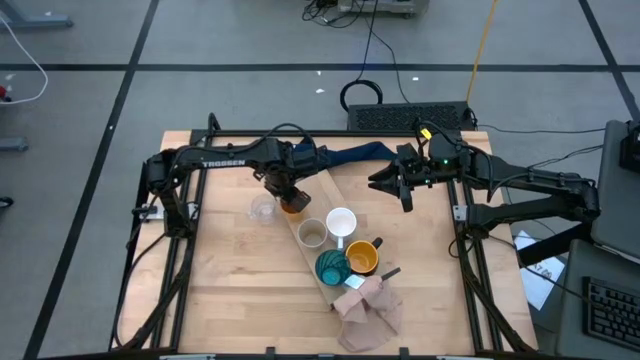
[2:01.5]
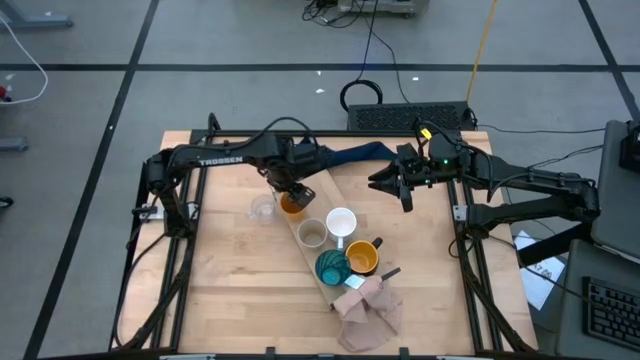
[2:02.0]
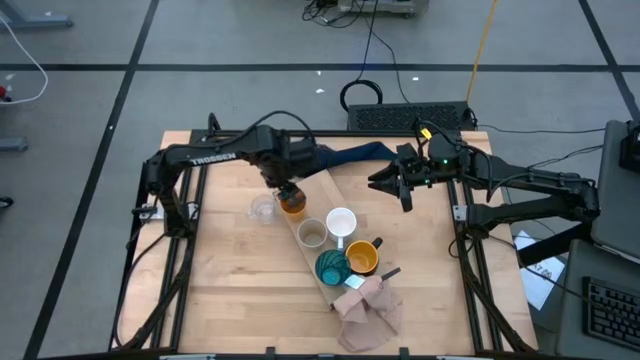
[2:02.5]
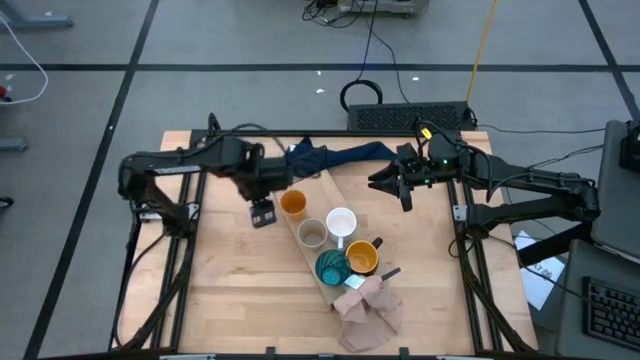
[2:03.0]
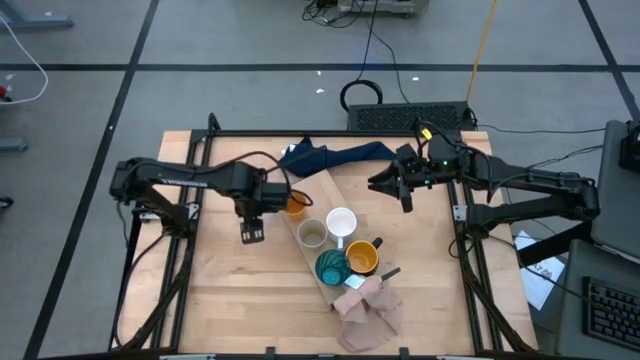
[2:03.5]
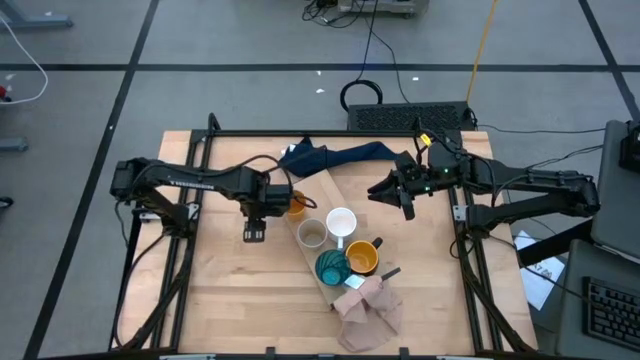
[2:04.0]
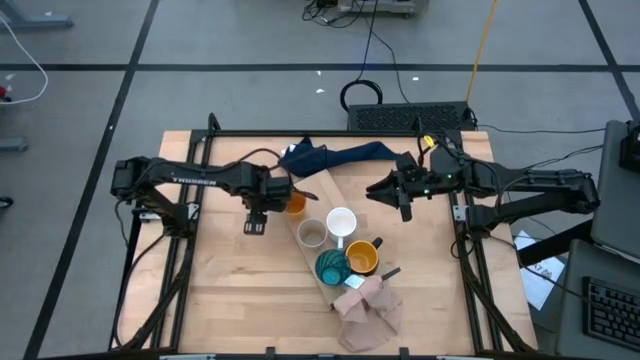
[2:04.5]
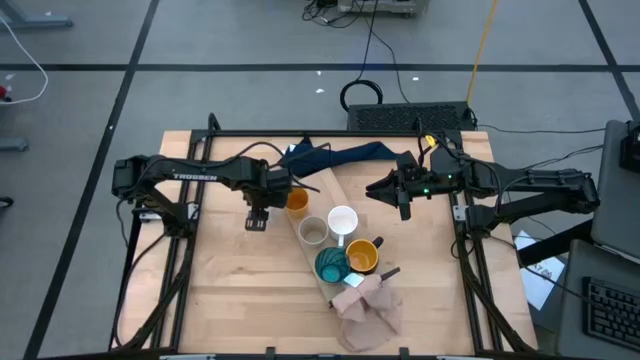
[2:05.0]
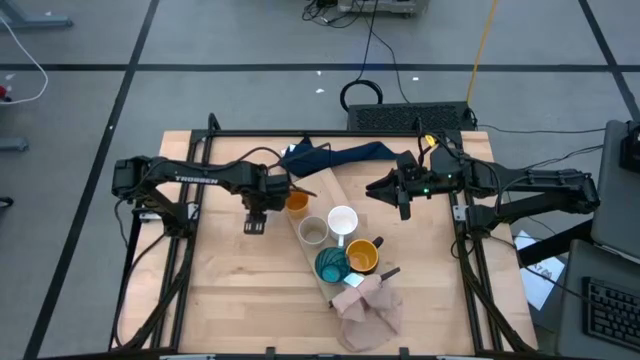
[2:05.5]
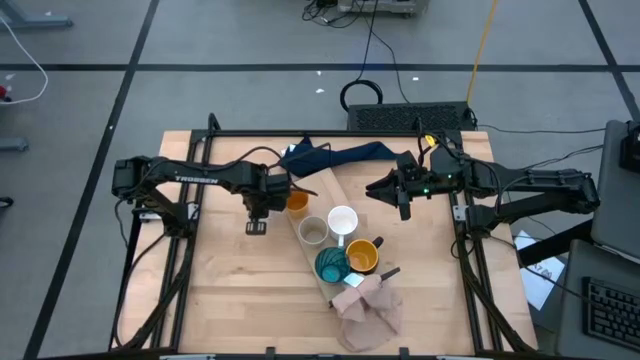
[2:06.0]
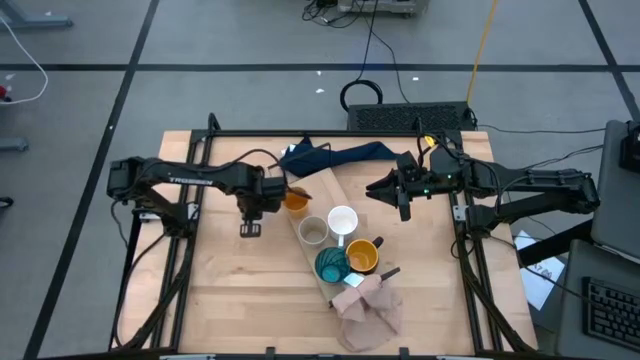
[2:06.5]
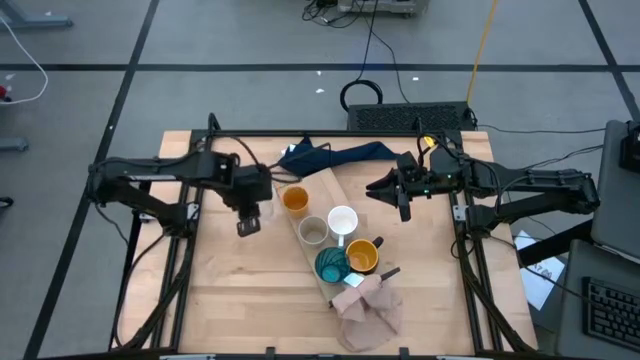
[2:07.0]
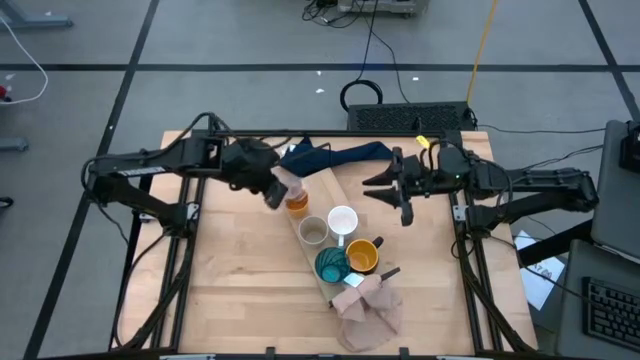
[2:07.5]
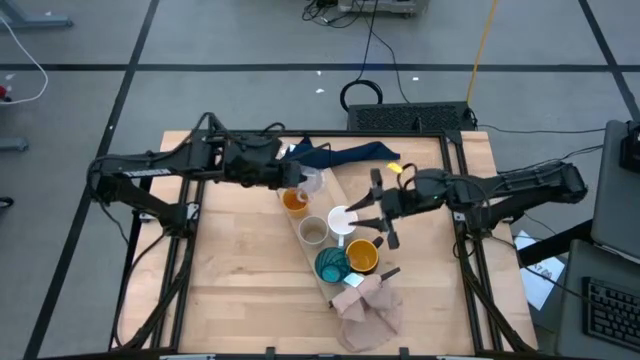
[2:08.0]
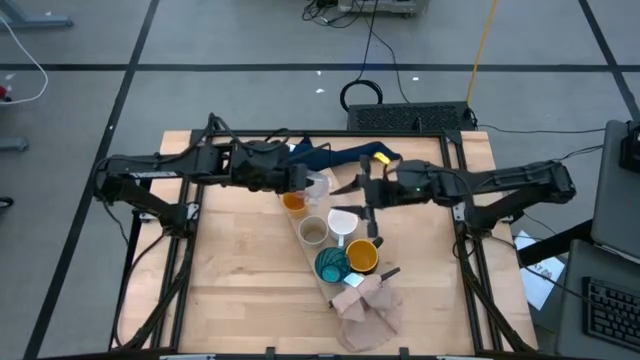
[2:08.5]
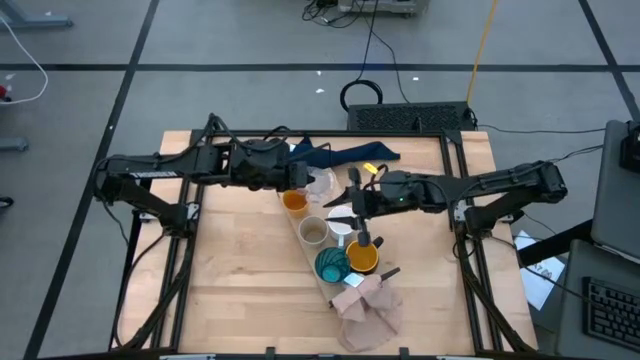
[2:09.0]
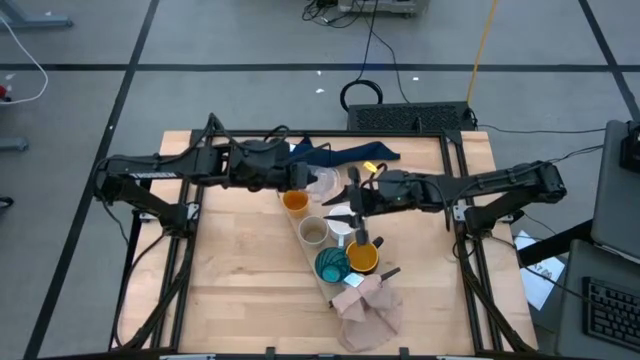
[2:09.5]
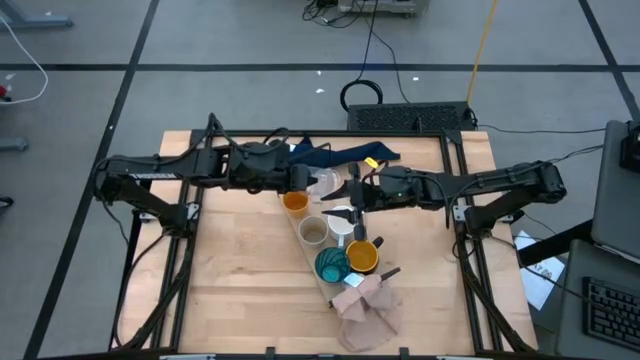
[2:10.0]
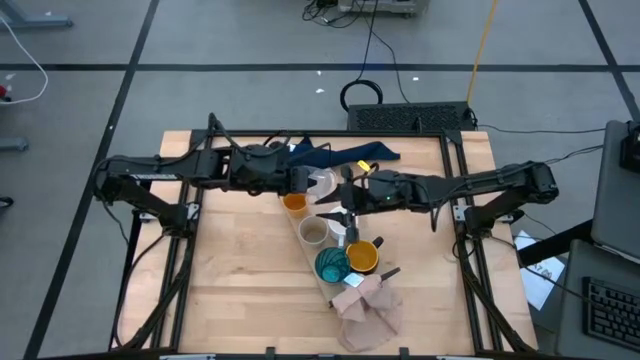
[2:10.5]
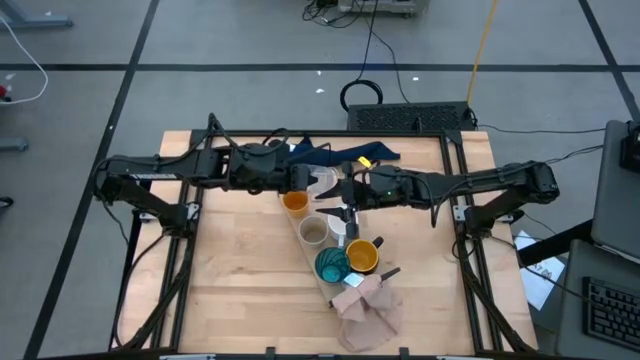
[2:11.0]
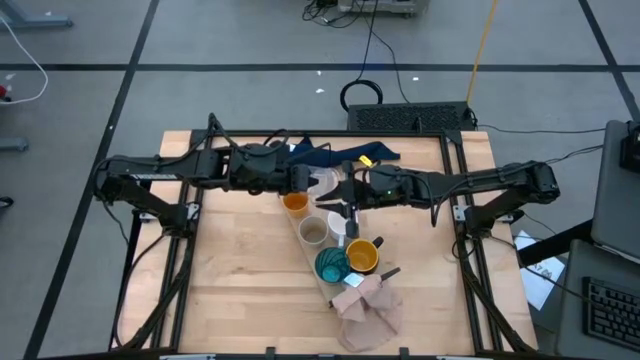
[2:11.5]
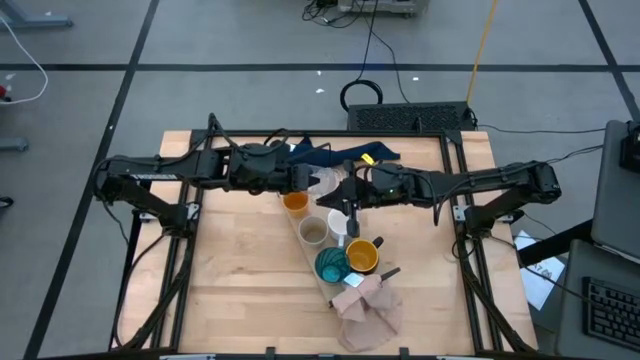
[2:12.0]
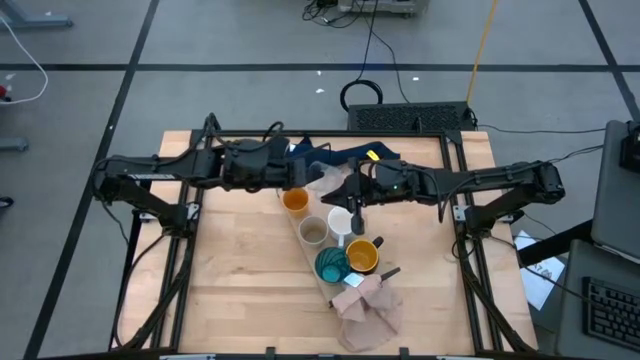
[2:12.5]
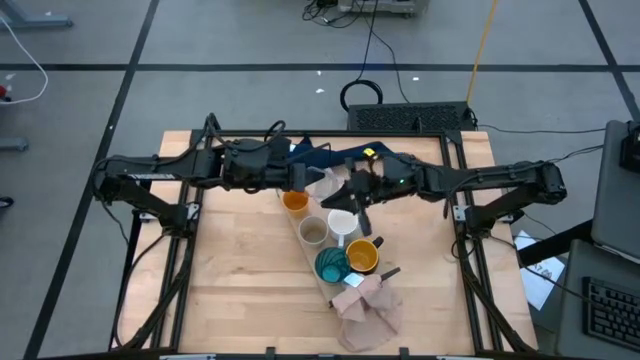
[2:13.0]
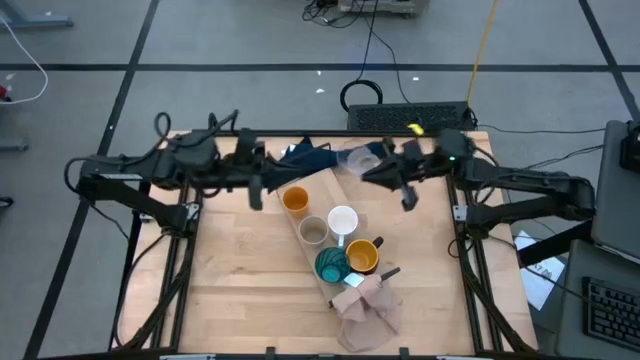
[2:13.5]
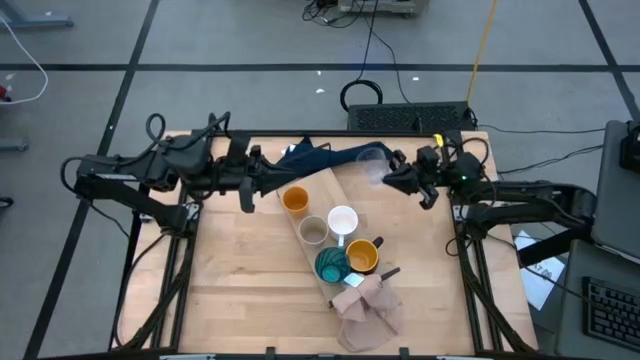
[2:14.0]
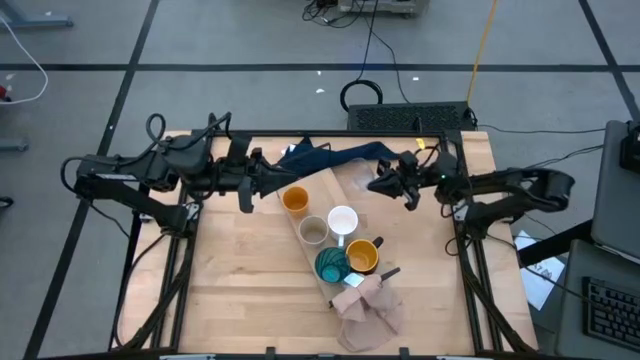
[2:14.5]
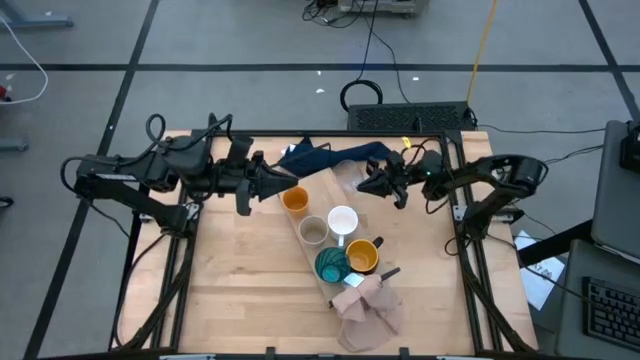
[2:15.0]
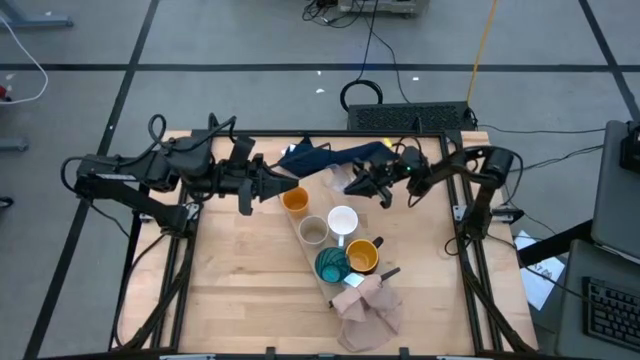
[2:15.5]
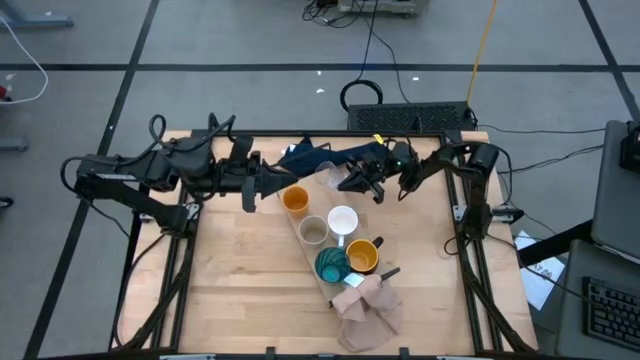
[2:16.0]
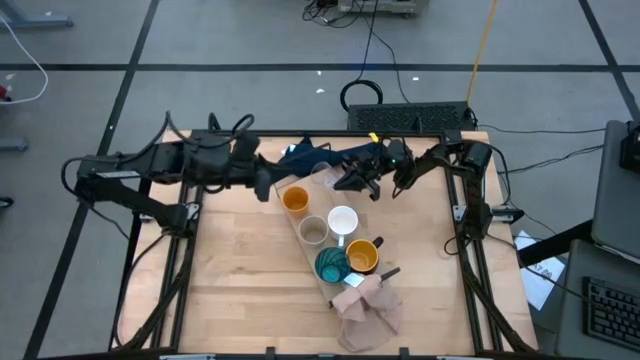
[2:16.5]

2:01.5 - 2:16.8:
Task: Stack small to large cups/mugs on shelf
Put the transparent mug on the shelf
